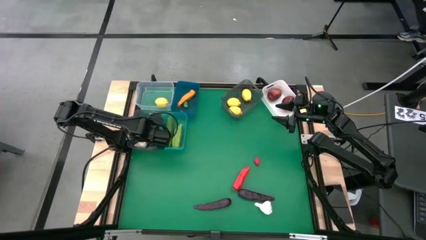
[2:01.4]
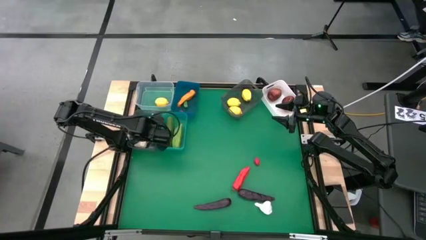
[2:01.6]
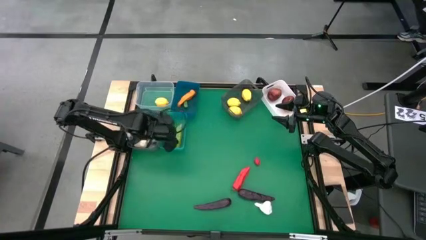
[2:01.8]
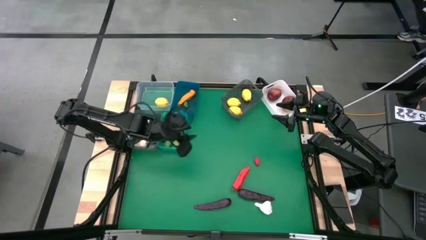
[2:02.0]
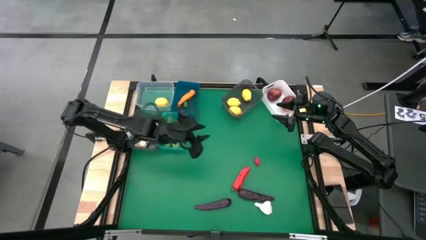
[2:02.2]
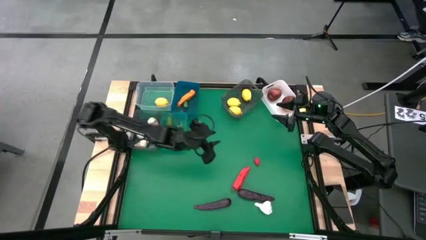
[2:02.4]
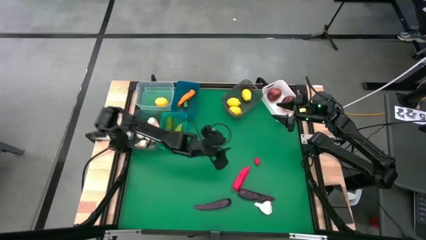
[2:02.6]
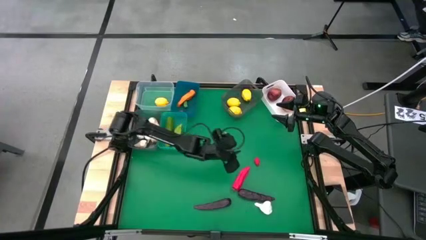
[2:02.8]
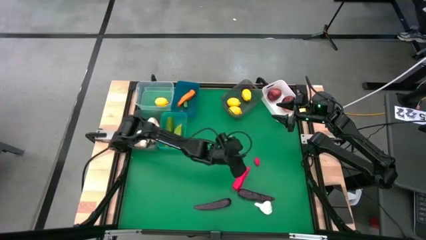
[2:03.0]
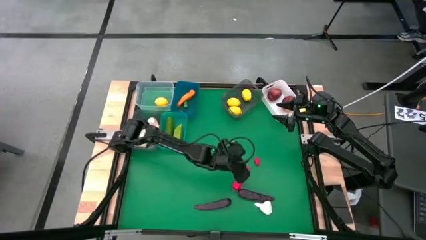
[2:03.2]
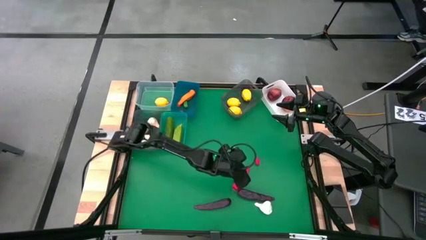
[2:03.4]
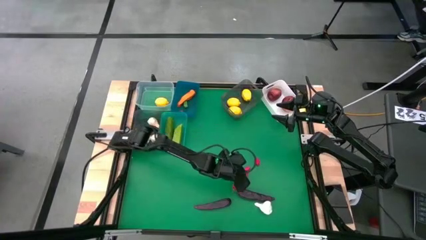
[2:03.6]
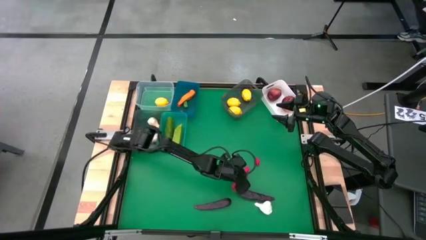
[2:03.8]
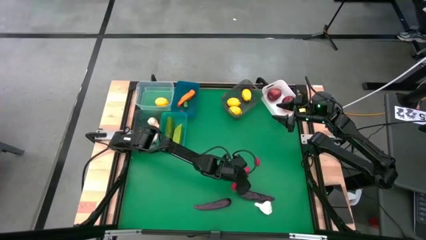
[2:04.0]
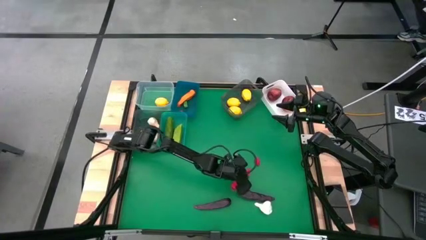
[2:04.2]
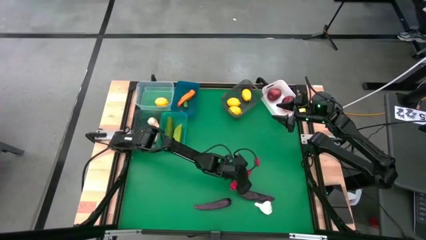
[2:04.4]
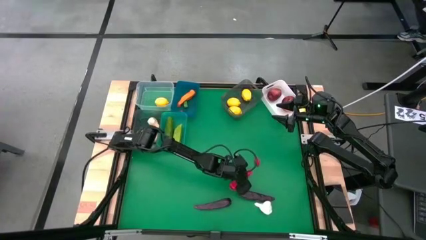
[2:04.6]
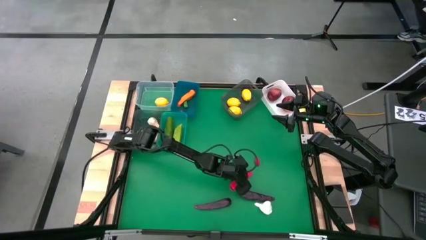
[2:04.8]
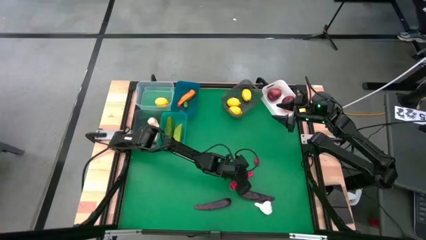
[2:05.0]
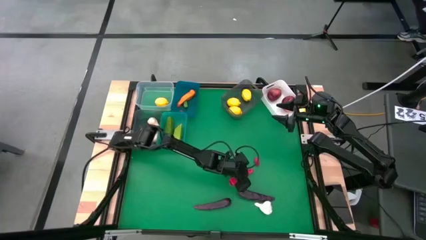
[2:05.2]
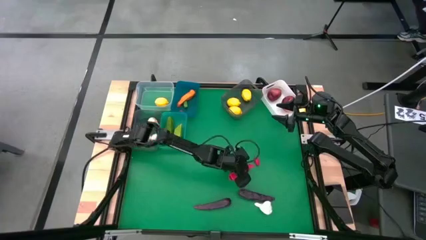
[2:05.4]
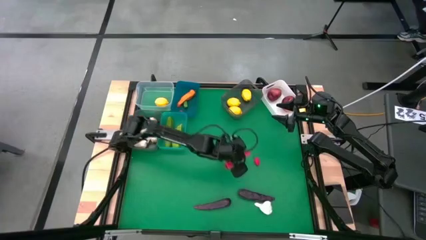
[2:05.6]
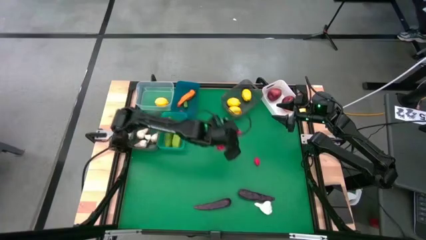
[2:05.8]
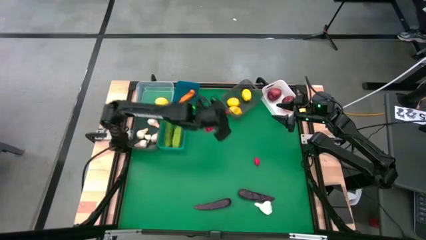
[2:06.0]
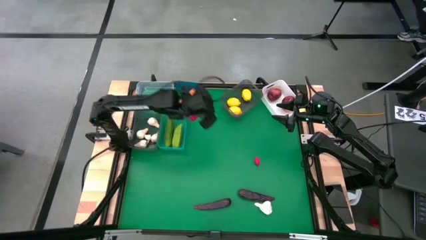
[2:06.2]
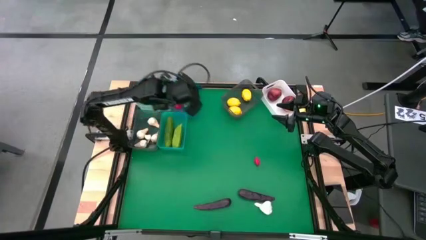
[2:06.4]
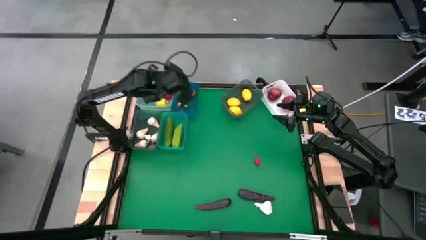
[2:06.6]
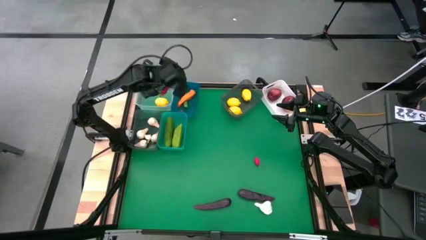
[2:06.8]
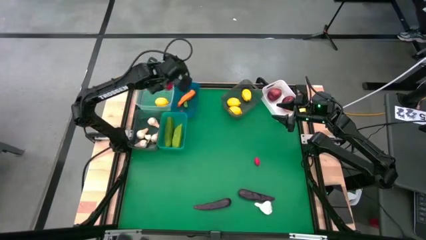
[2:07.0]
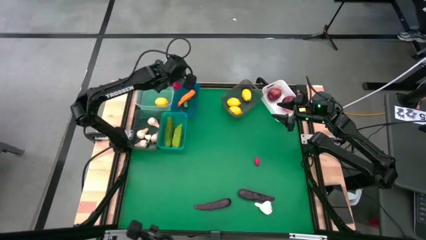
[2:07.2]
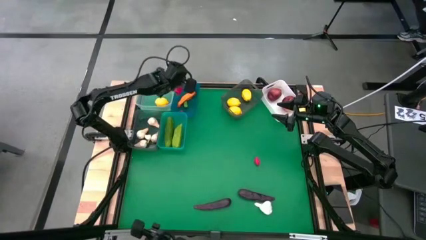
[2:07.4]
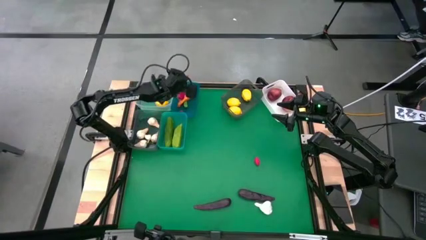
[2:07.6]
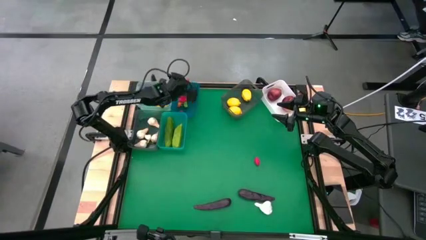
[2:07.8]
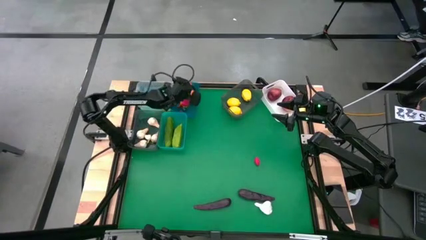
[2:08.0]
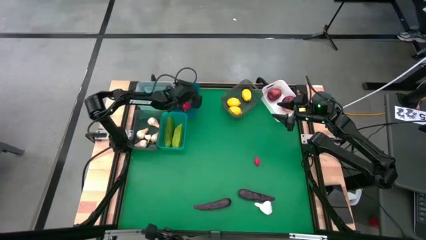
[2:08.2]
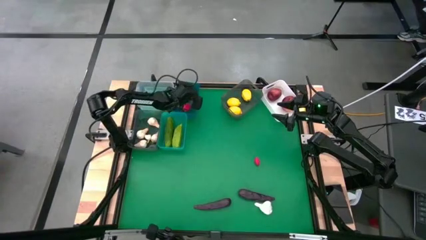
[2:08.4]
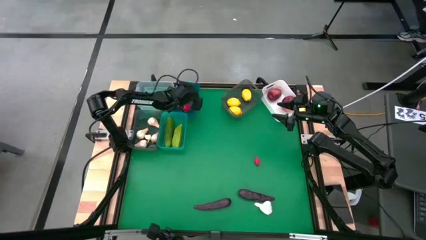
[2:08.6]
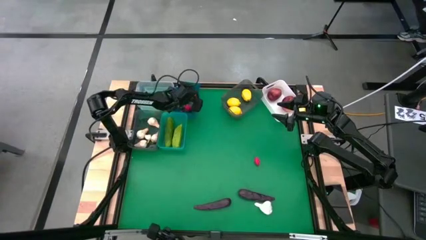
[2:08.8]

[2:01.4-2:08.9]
Task: Sort produce into baskets
Put the red pepper into the blue bin

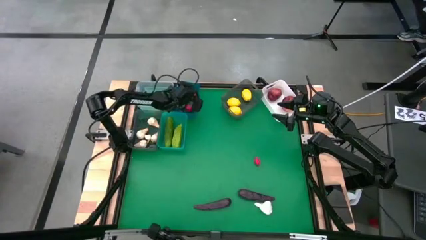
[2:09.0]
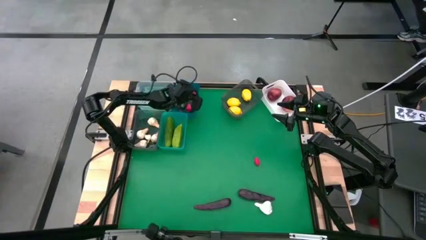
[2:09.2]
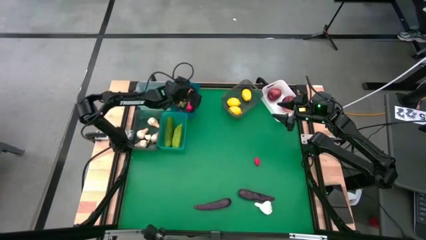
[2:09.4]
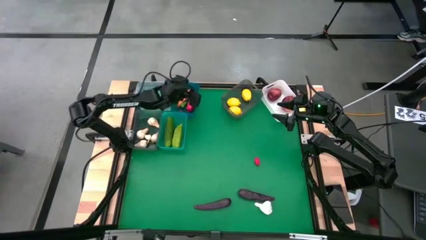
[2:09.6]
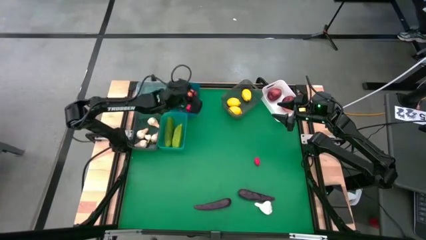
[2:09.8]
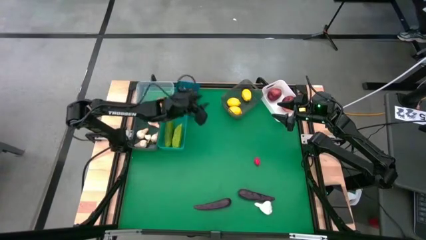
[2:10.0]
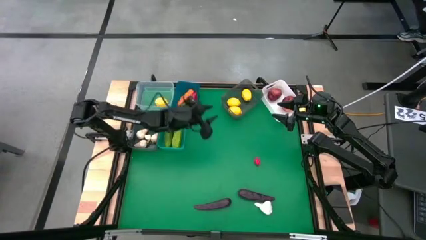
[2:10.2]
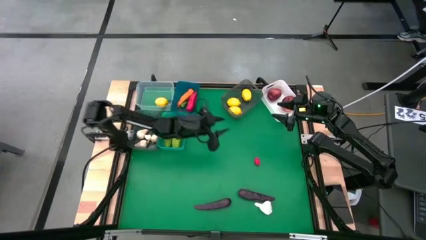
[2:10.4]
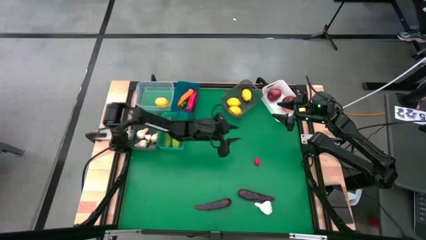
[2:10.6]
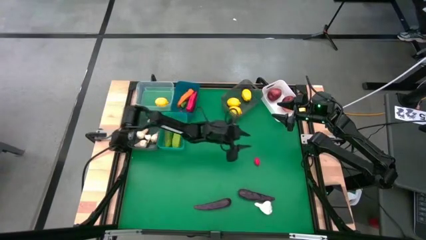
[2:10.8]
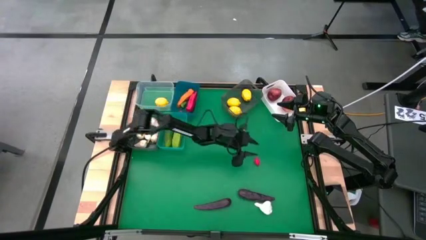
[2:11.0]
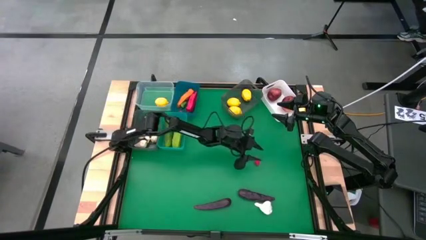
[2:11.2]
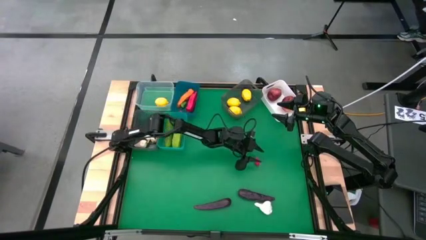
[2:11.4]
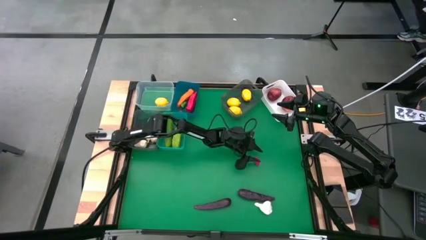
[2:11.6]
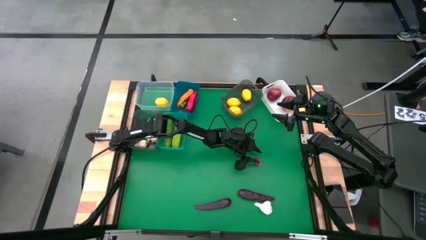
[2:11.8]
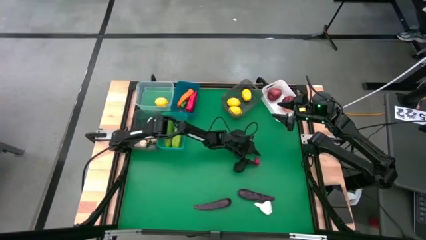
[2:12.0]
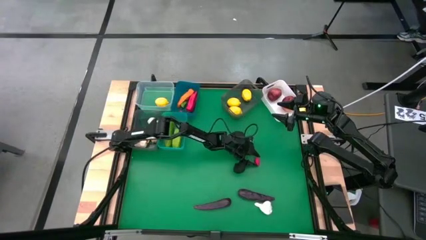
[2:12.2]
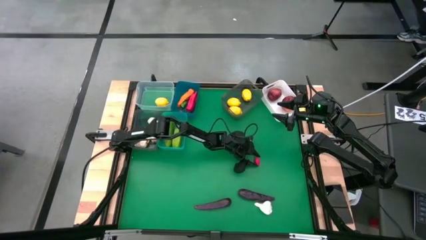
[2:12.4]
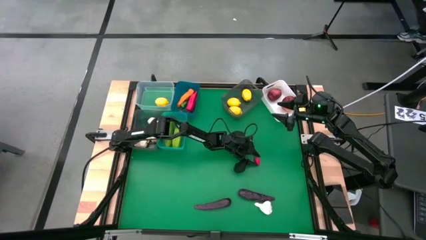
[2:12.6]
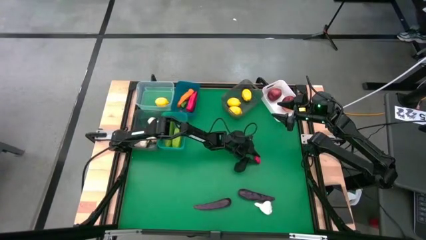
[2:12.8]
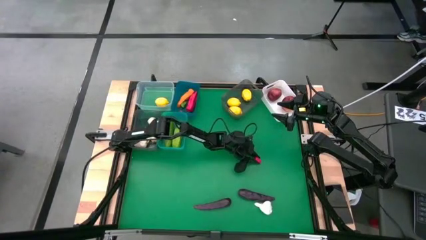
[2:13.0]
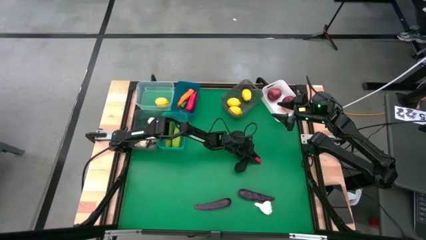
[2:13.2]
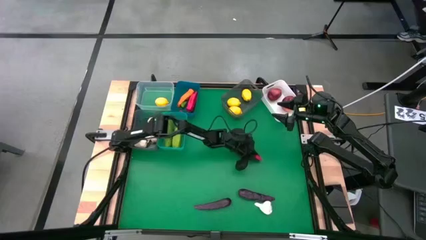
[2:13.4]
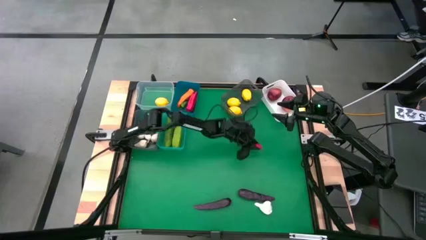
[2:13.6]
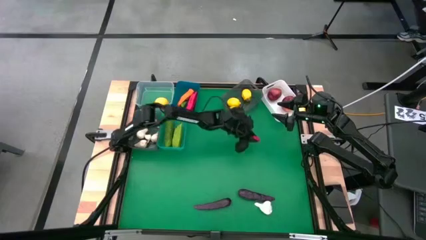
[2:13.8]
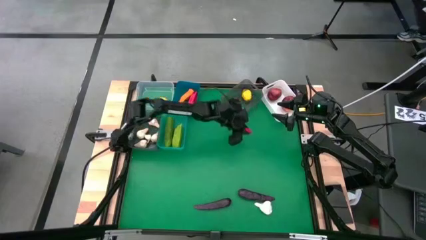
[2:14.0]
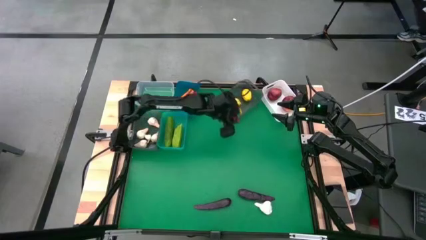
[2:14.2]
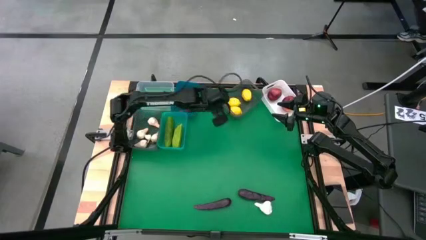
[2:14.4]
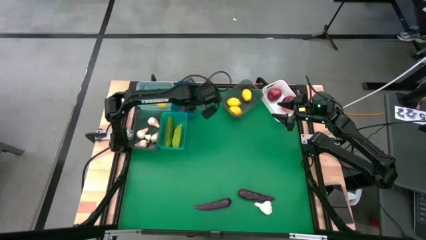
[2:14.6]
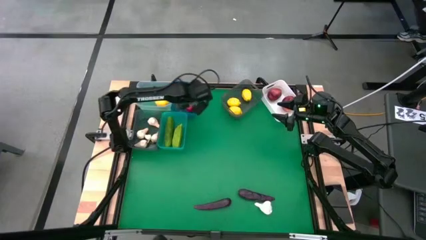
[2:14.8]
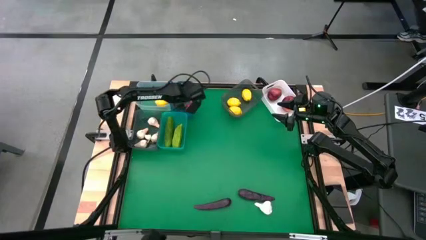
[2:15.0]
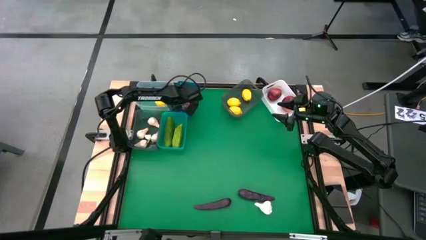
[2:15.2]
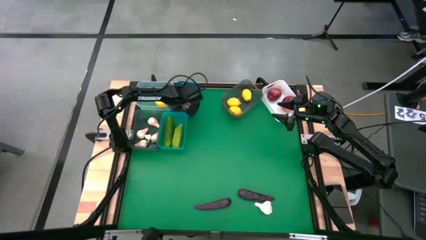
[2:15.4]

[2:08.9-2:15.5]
Put the red pepper into the blue bin

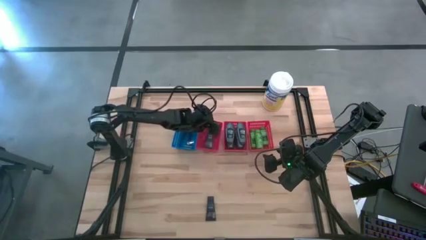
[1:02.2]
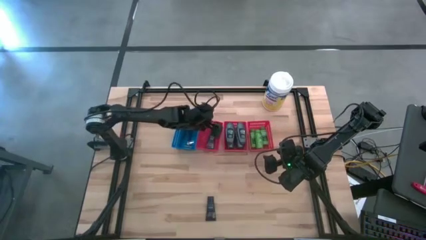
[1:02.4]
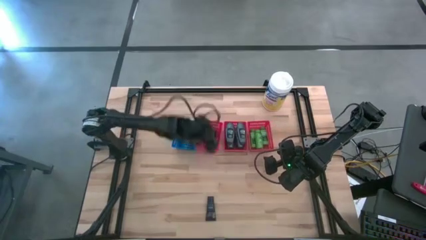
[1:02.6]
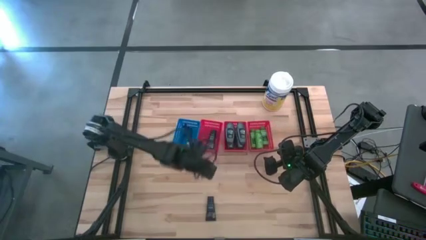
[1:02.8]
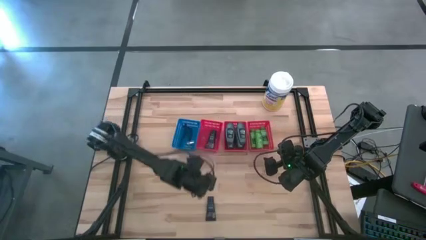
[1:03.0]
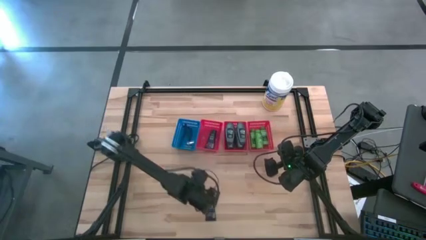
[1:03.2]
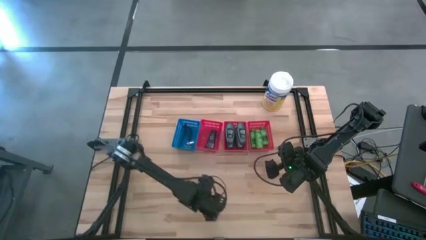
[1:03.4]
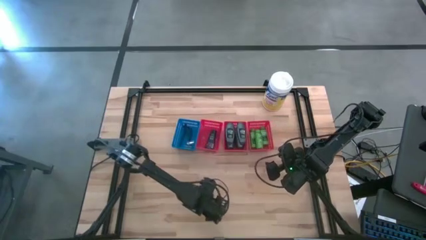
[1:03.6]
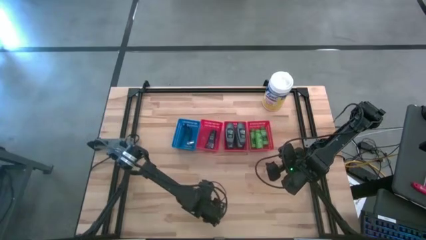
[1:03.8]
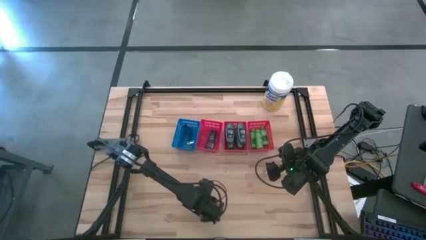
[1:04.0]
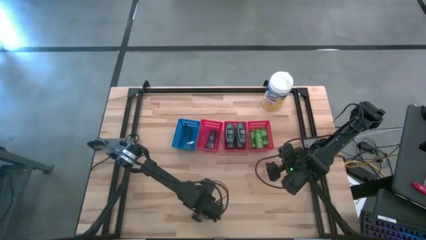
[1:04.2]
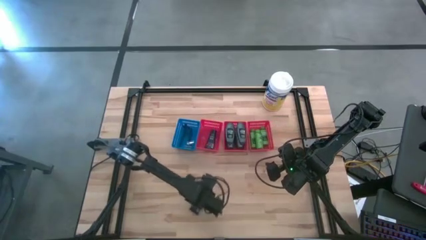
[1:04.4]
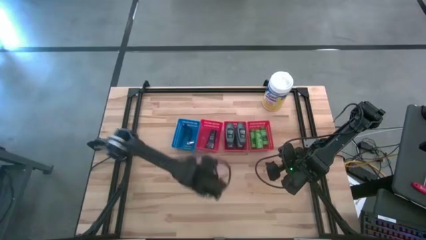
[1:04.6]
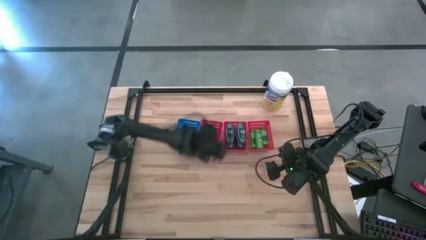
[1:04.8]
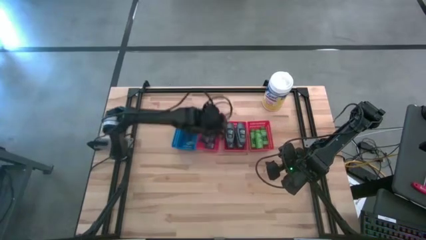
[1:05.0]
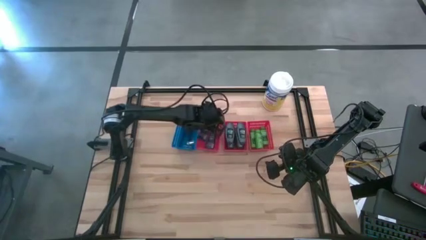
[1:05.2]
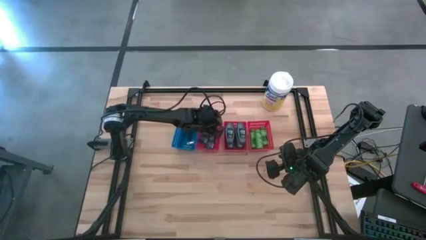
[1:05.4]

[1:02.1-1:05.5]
Task: Pick & Place Travel size toiletries
Put the blue shave cream into the left red bin
